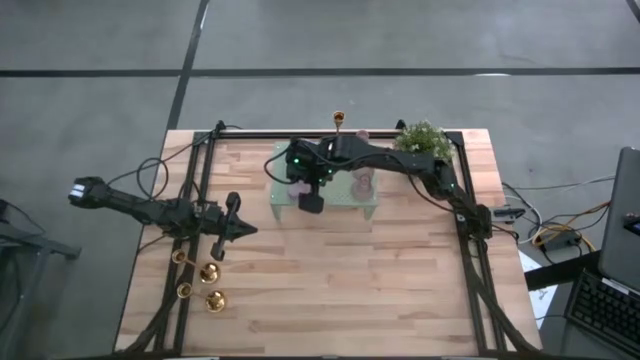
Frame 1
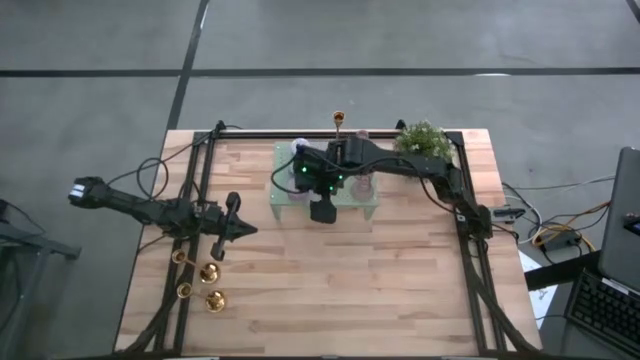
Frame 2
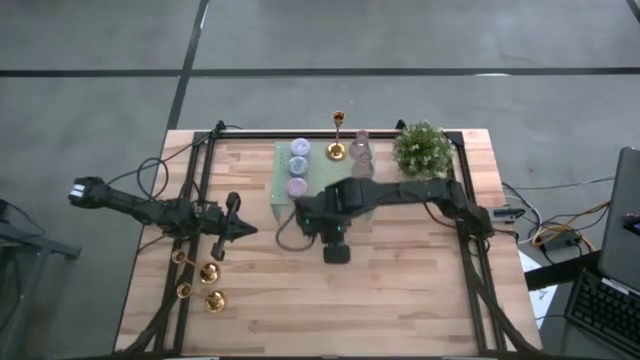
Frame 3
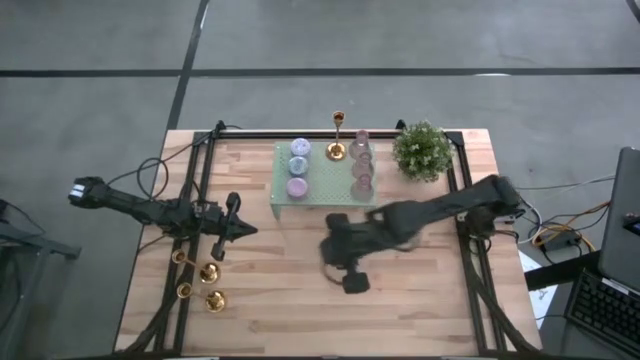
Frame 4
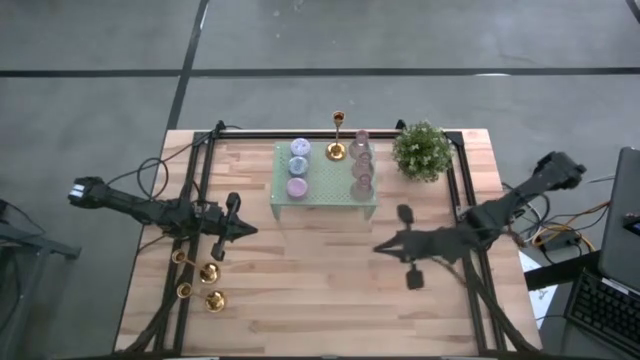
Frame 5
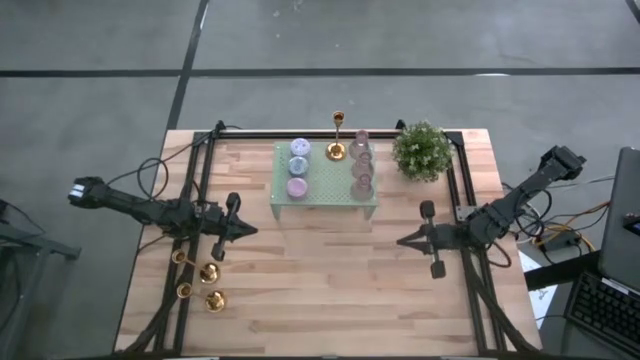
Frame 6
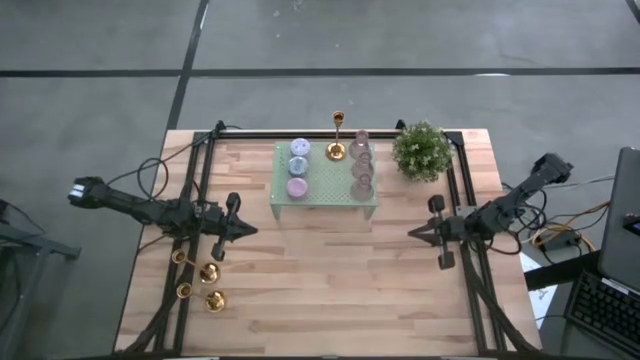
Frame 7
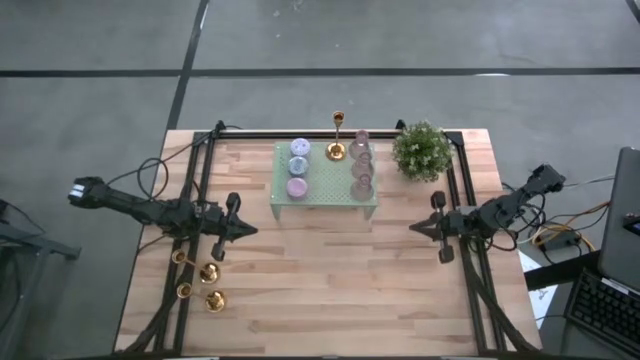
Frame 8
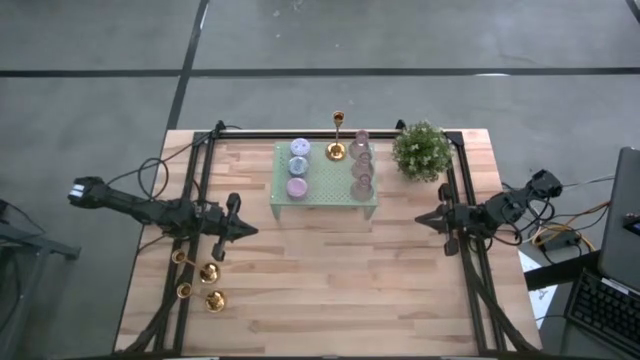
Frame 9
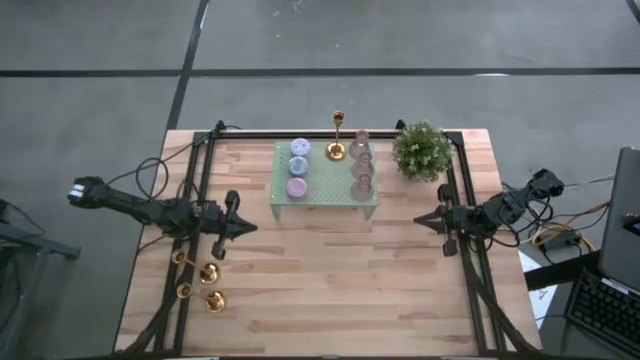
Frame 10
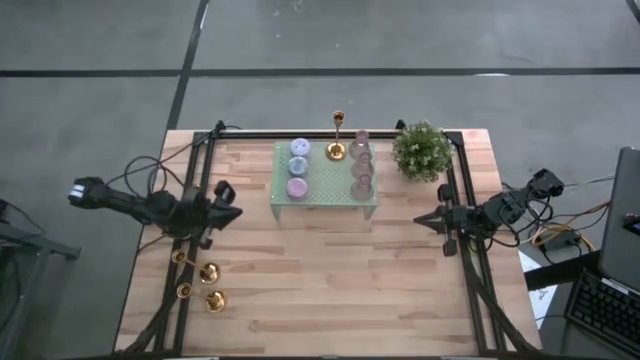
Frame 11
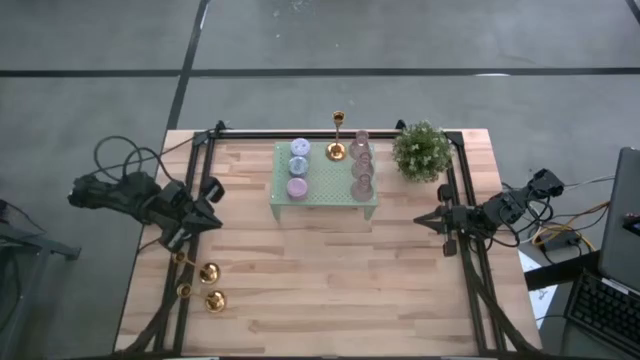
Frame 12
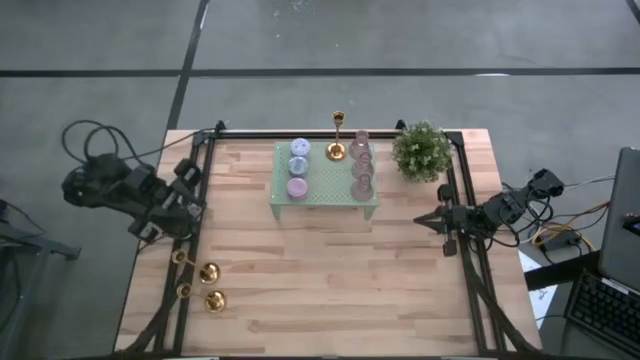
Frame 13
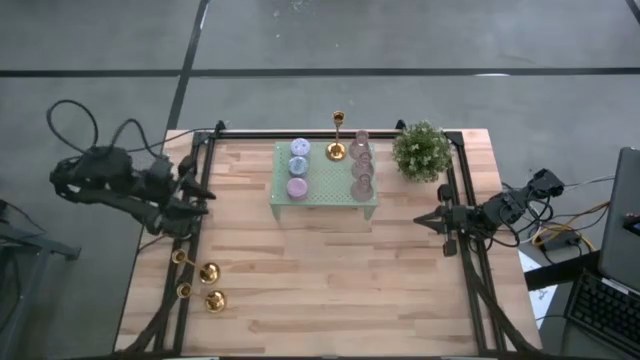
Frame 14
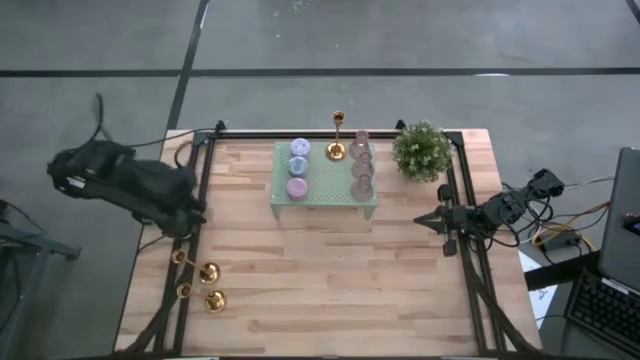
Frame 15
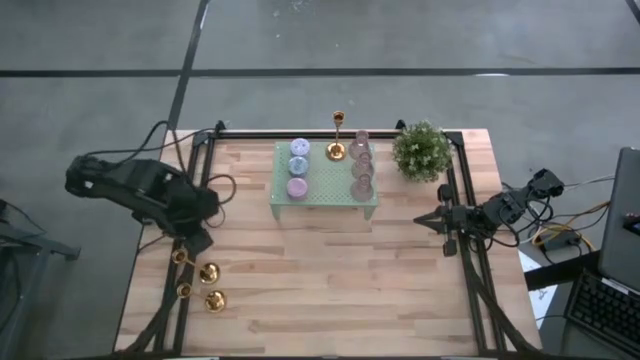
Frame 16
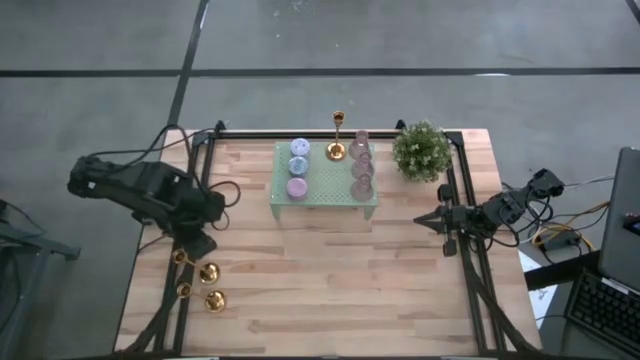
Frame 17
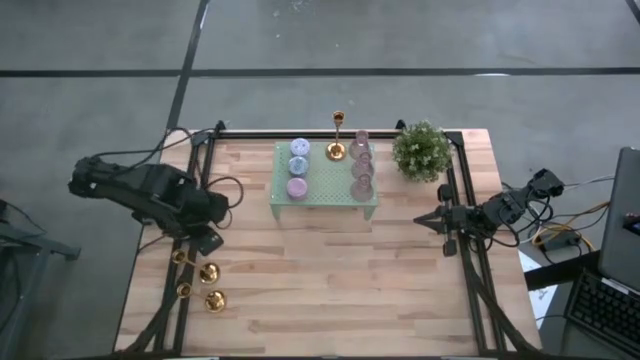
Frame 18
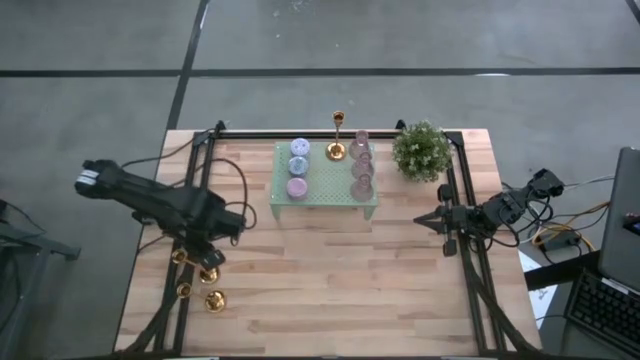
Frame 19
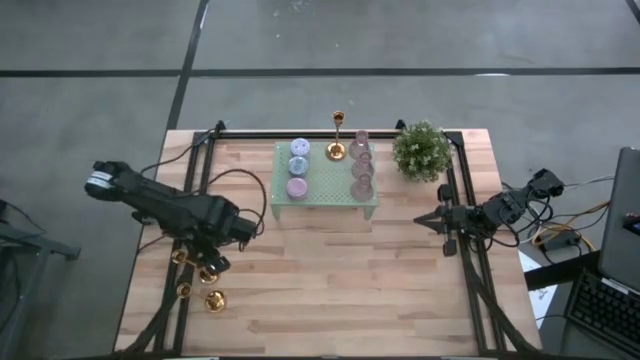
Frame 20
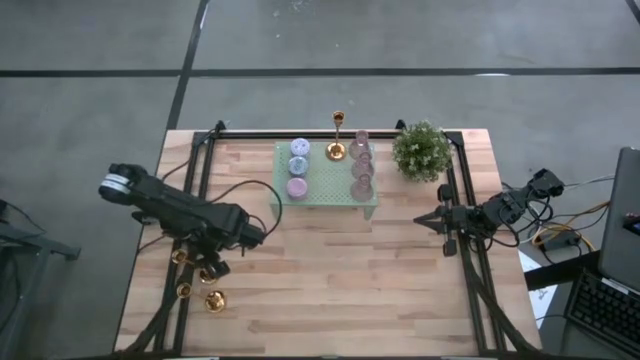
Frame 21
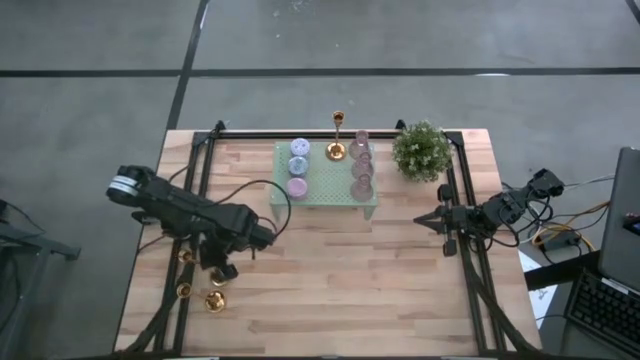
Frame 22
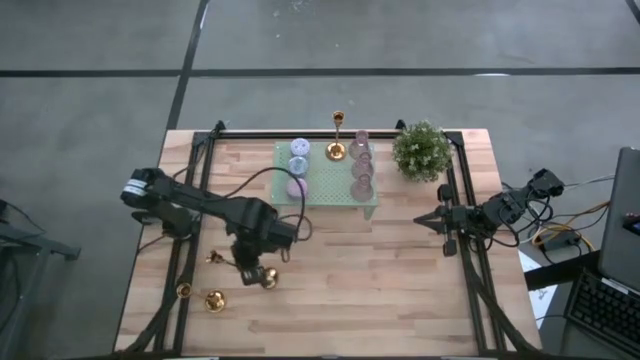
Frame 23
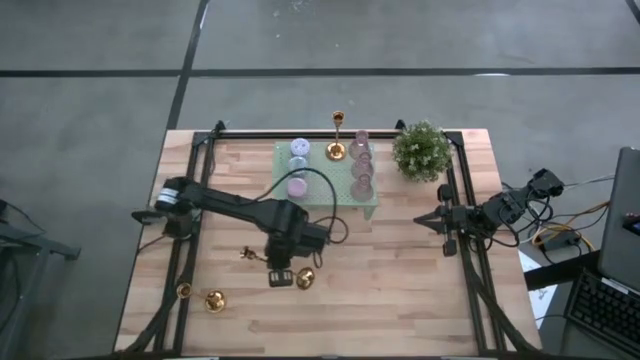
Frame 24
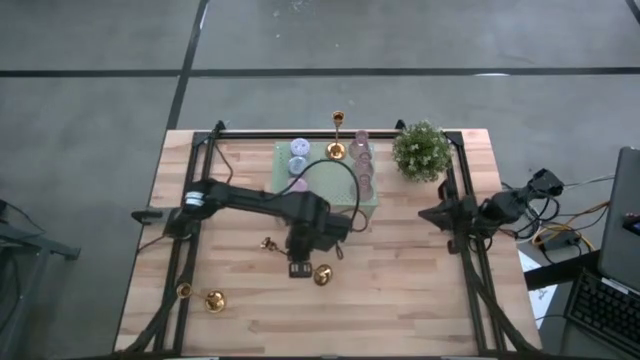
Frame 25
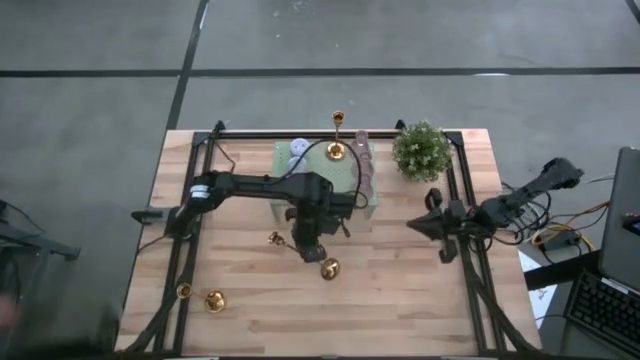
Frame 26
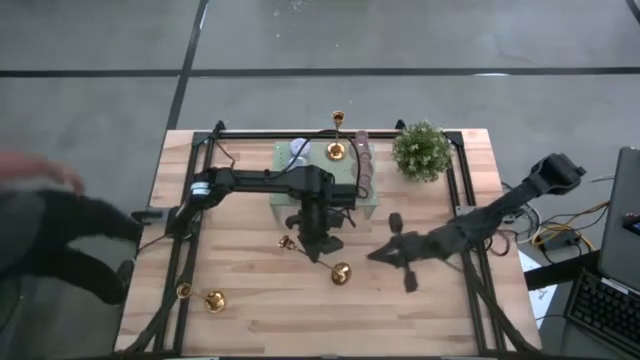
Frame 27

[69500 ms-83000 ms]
Task: Pick & Place candle stick holders
Put the top gold candle holder on the shelf aligned with the other gold candle holder

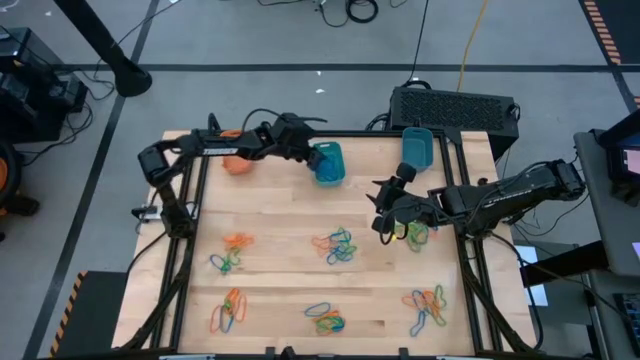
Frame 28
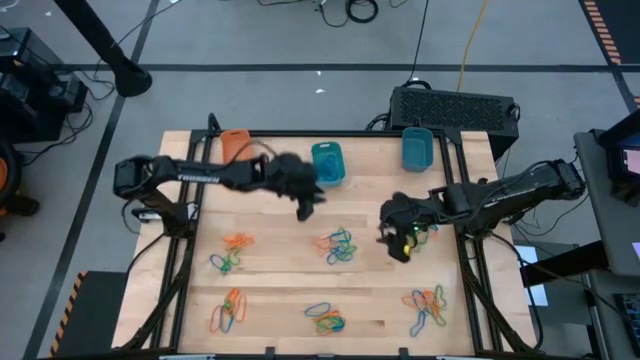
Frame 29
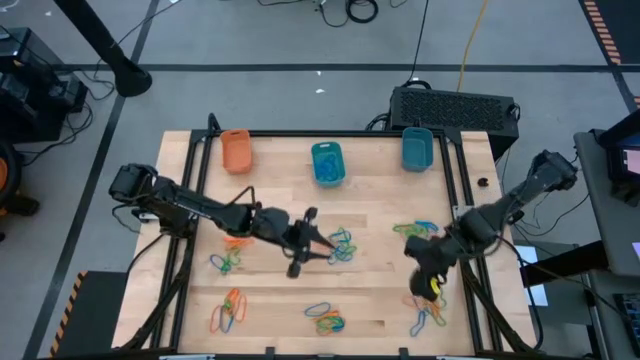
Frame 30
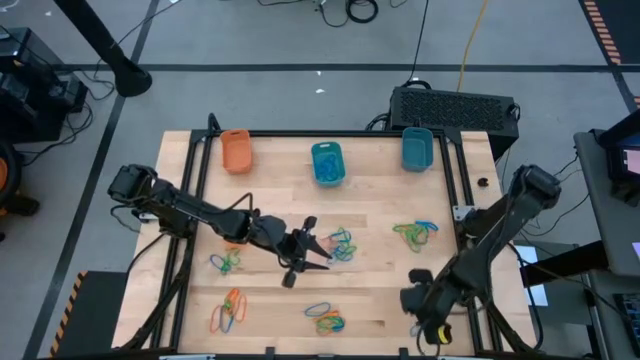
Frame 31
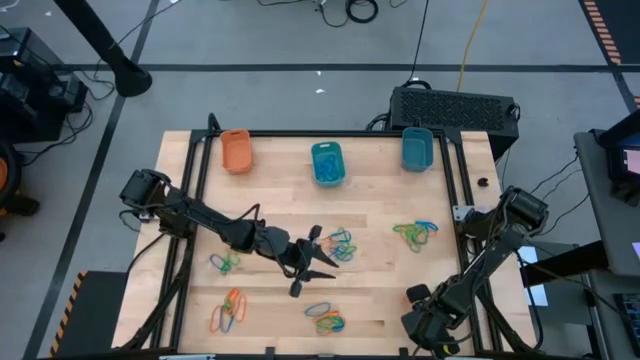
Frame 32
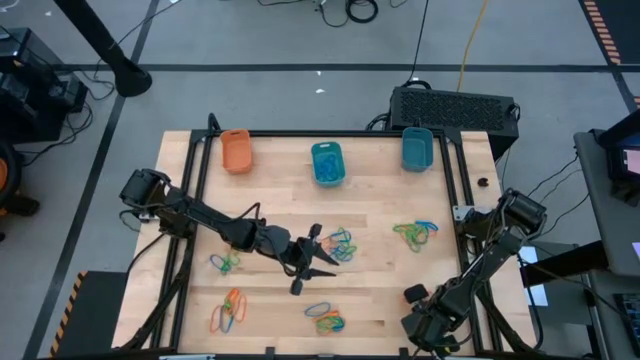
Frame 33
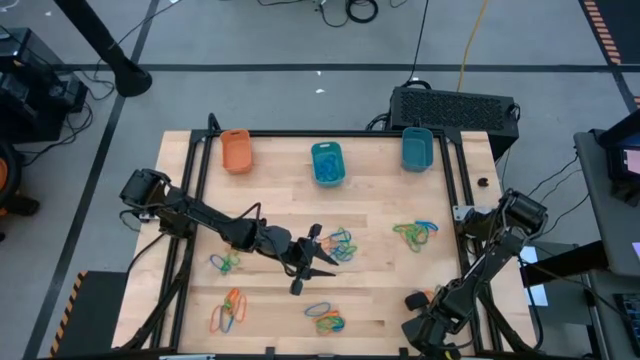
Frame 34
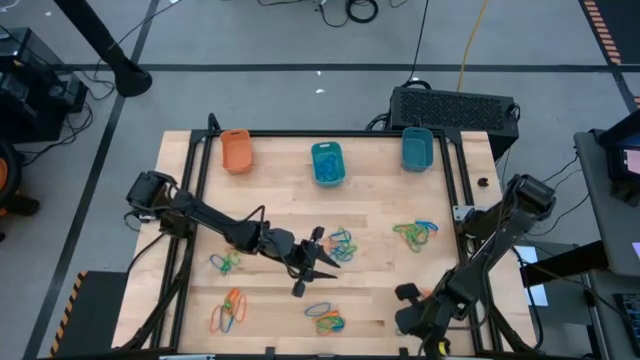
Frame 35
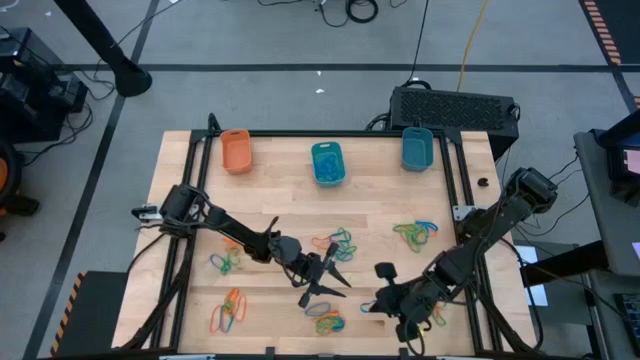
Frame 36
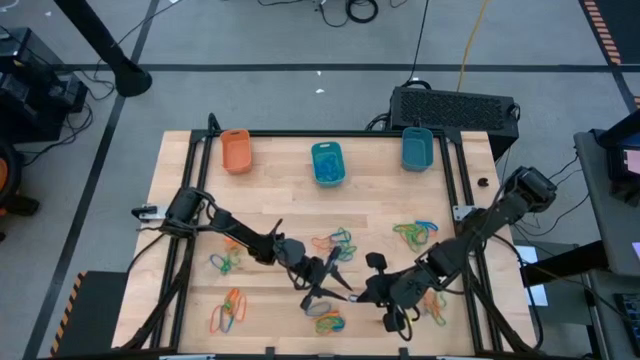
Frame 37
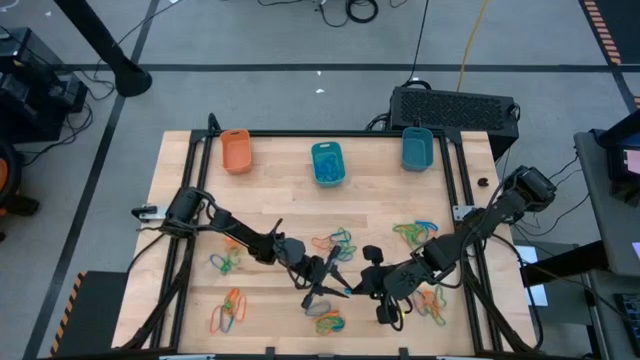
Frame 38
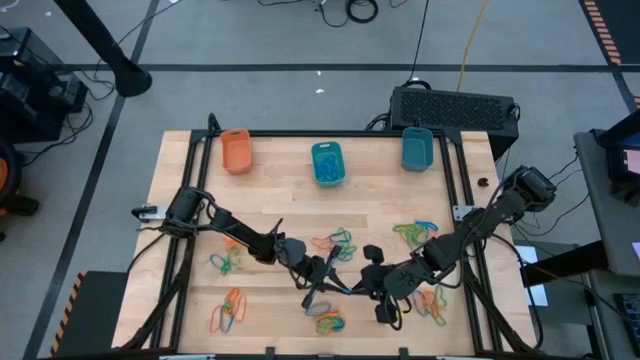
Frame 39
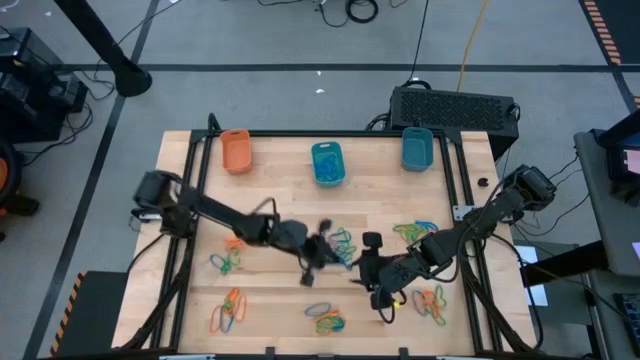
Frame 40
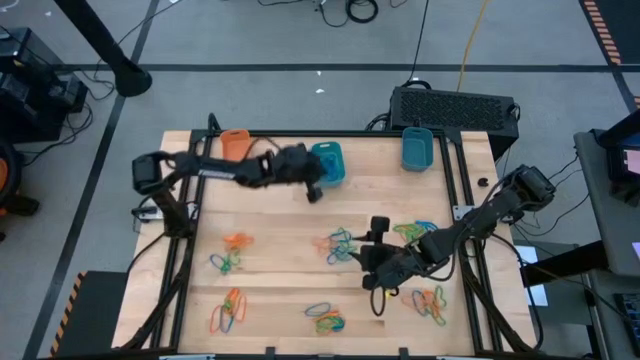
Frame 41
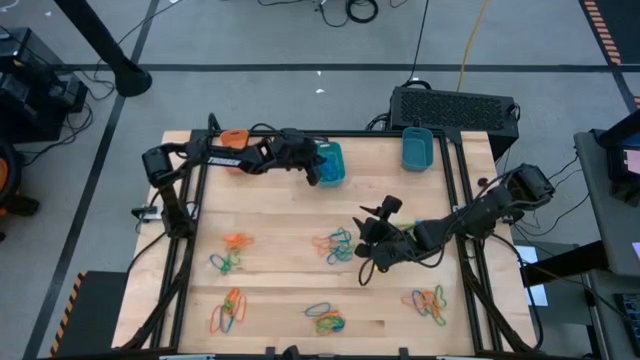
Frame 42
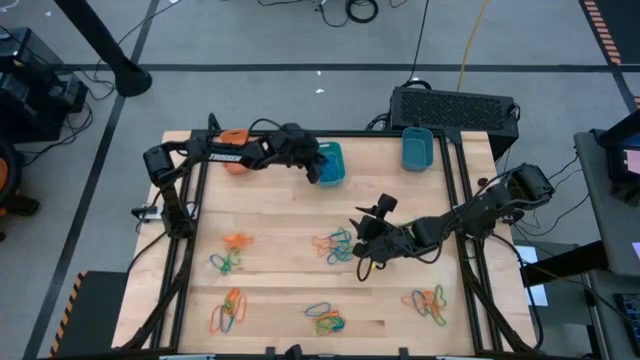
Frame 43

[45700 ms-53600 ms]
Task: Sort rubber bands into baskets
Put the blue rubber band into the light blue bin

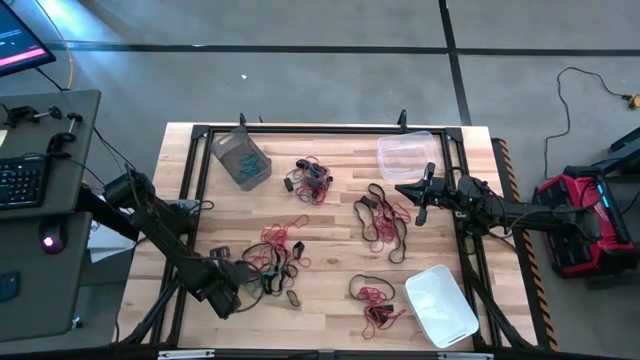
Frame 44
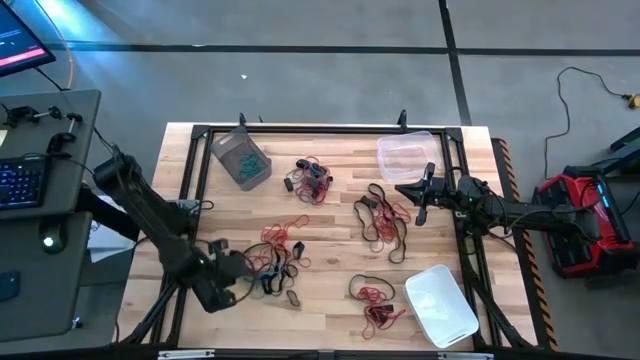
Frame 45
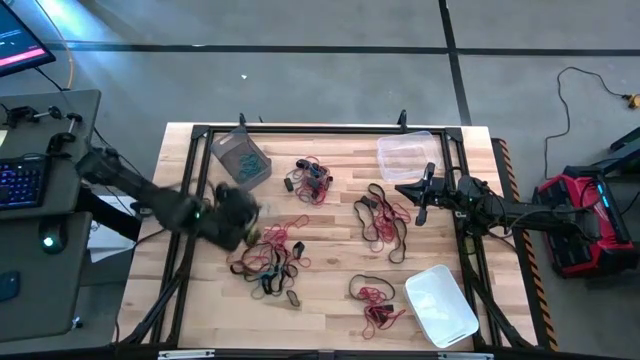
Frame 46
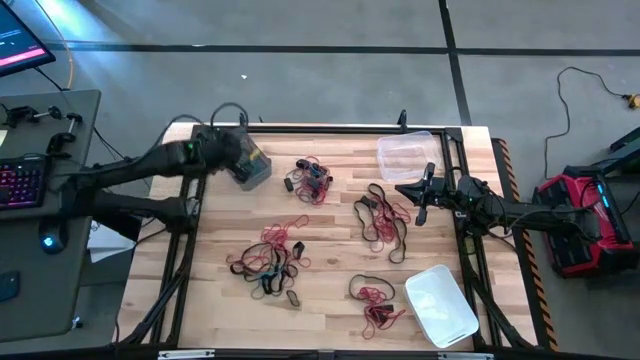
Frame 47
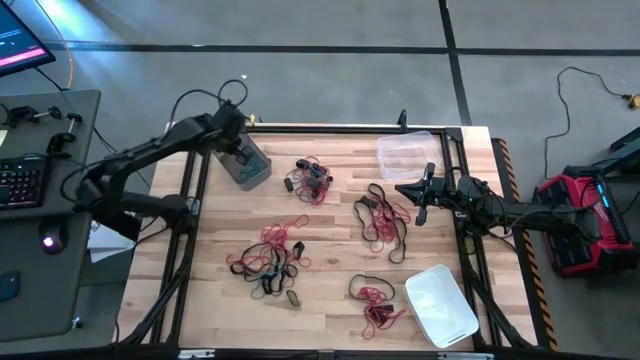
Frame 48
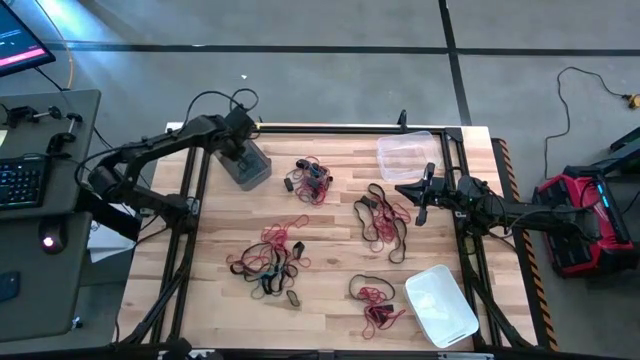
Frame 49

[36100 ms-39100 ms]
Task: Sort rubber bands into baskets
Put the blue rubber band into the black bin
